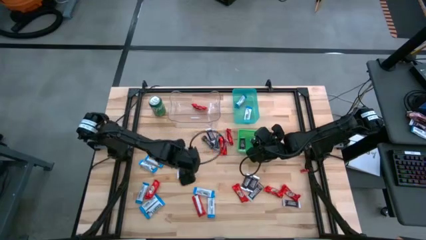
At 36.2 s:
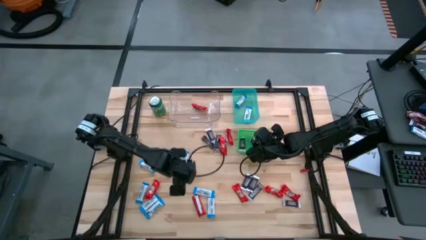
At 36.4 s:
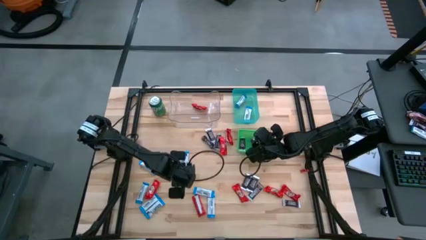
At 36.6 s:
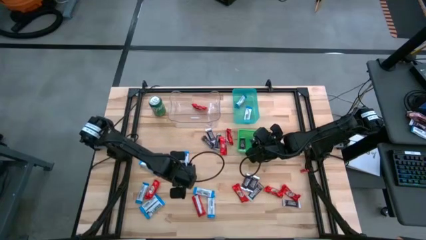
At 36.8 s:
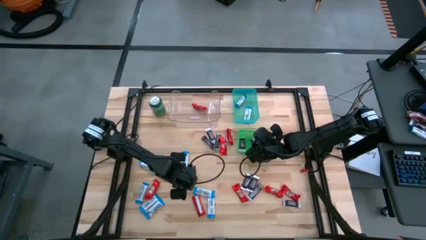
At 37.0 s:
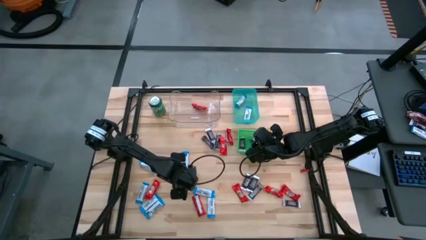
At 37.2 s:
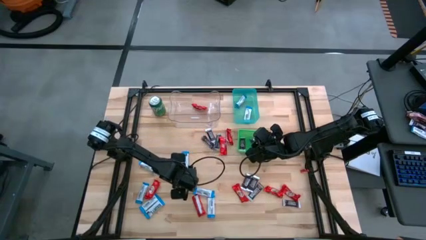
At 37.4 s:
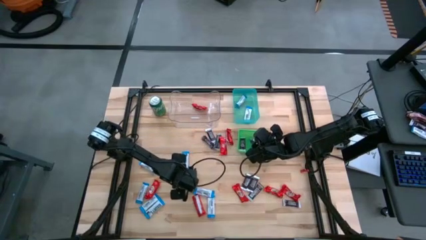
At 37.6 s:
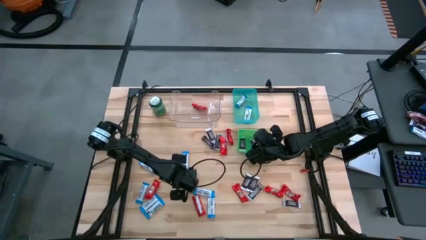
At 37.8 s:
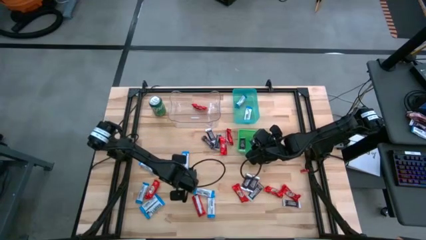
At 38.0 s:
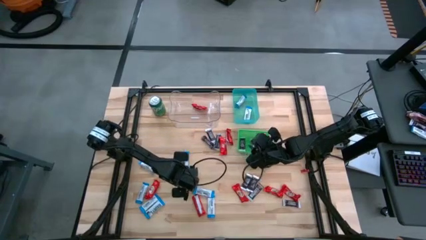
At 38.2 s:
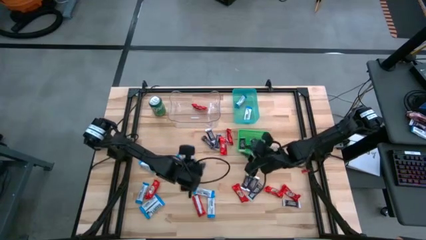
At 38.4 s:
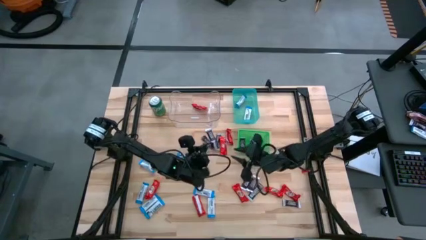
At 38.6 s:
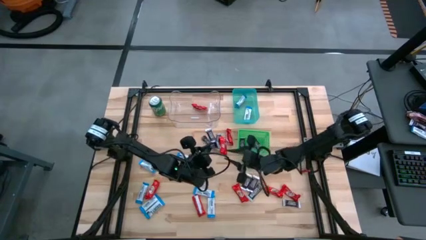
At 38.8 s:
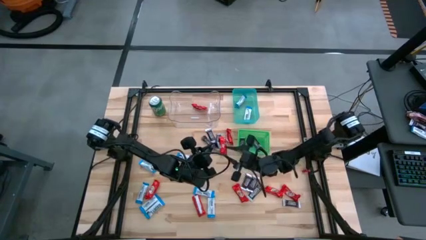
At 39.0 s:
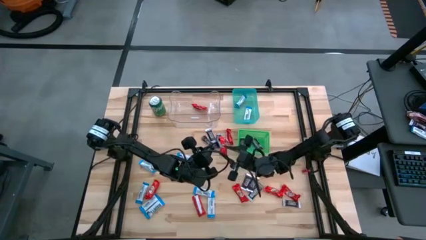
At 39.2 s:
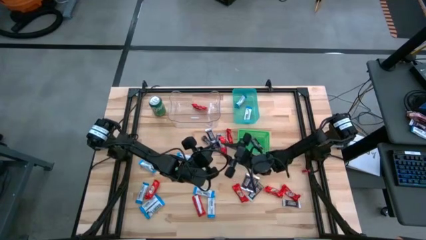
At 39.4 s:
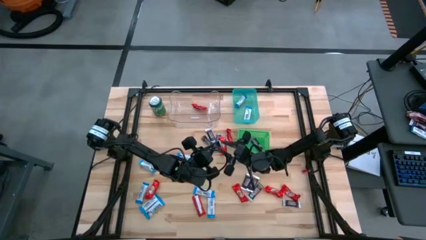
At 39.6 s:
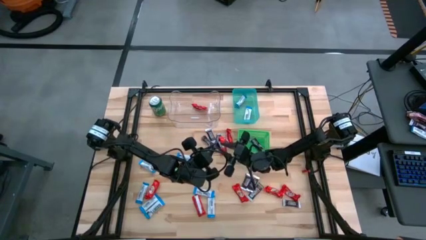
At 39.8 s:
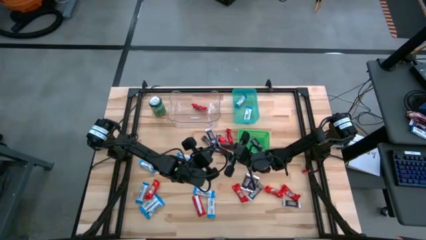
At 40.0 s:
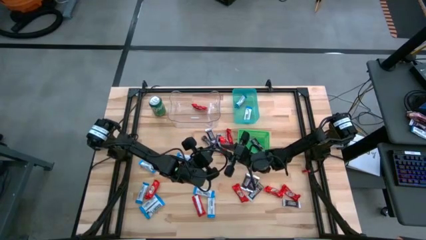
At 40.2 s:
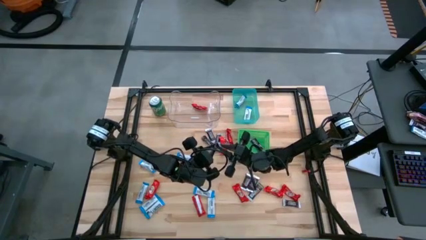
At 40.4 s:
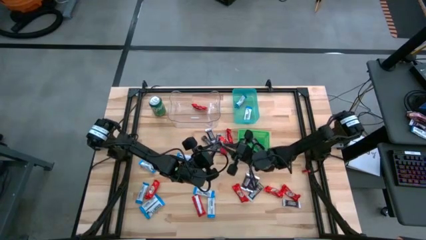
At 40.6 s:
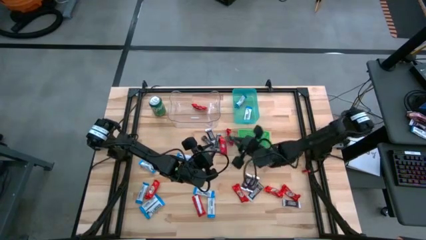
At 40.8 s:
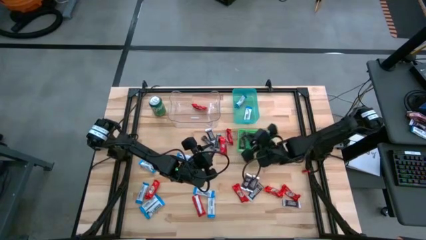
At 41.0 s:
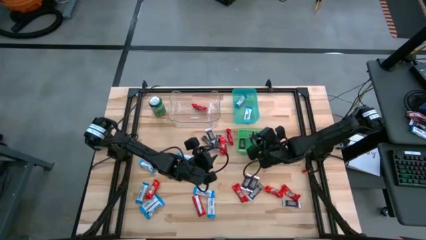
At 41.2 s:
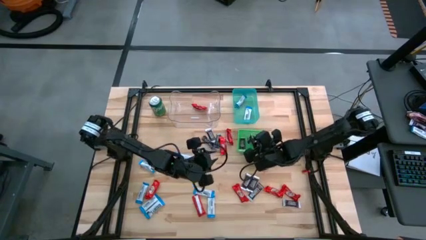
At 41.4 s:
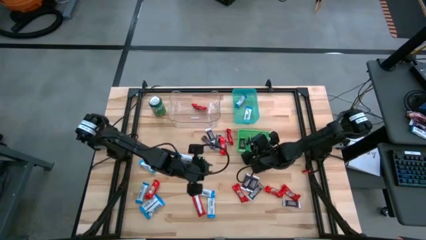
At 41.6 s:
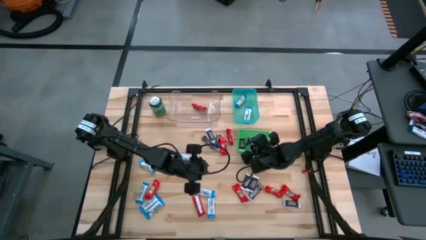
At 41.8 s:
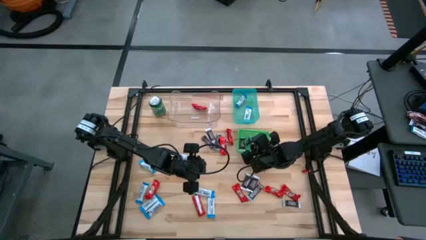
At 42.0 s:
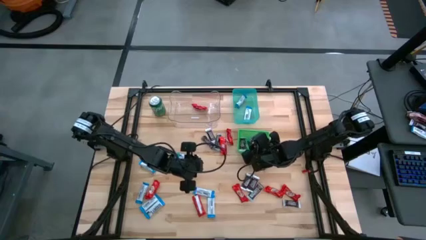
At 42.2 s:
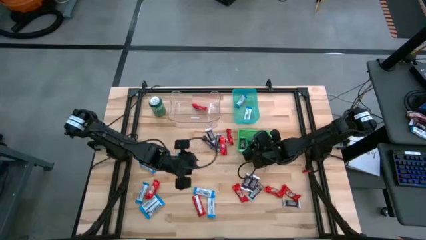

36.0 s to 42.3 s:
Task: Sort candy
Put the brown chocolate bar into the green bin

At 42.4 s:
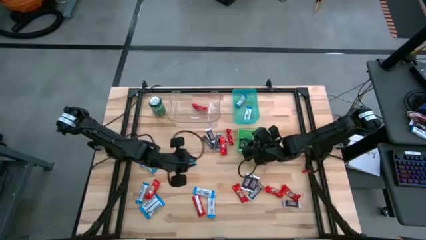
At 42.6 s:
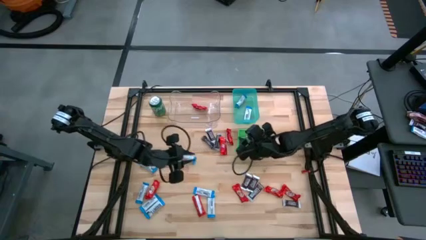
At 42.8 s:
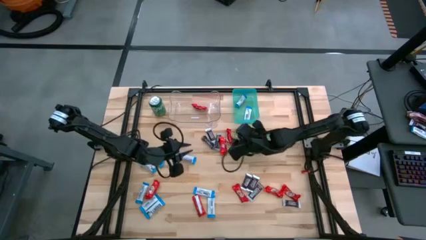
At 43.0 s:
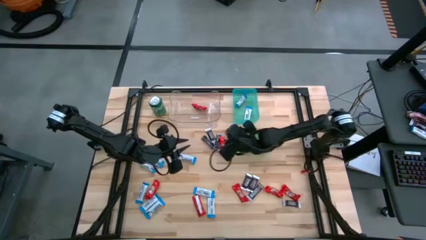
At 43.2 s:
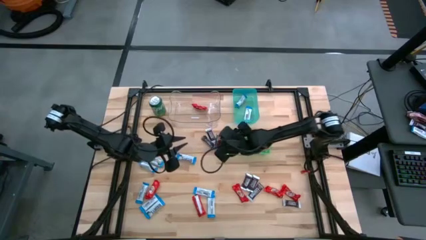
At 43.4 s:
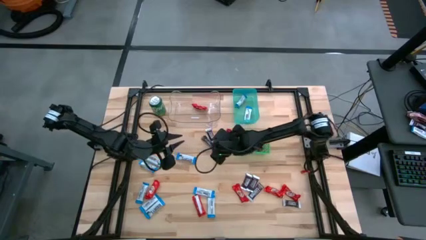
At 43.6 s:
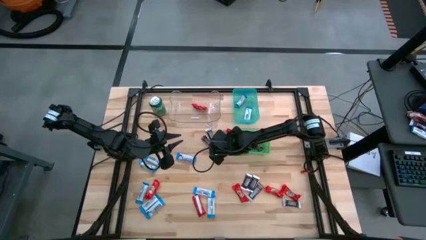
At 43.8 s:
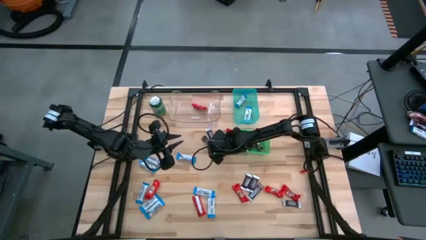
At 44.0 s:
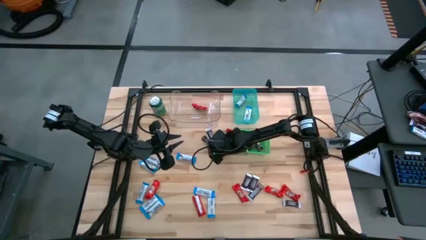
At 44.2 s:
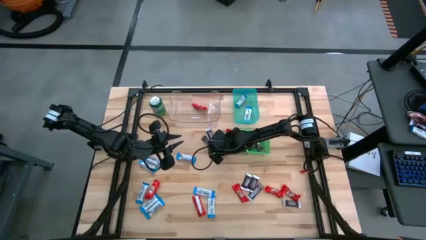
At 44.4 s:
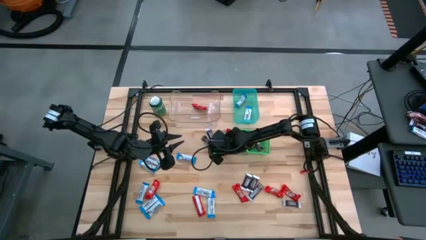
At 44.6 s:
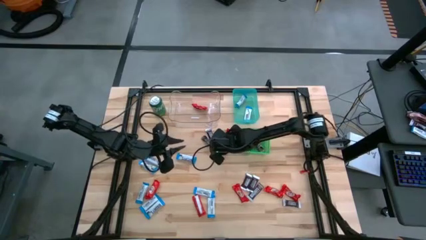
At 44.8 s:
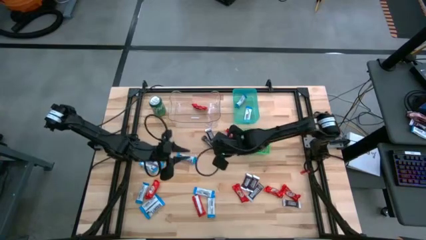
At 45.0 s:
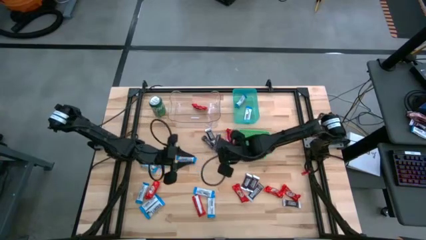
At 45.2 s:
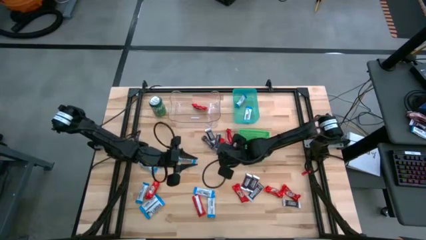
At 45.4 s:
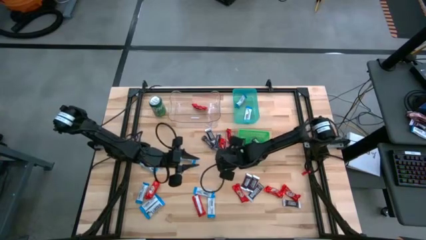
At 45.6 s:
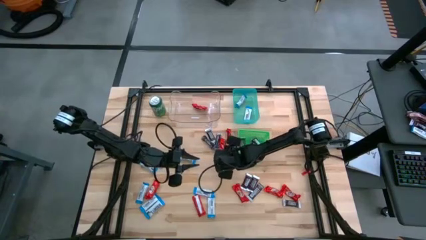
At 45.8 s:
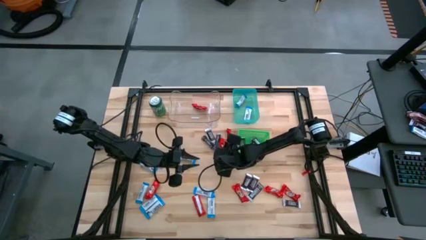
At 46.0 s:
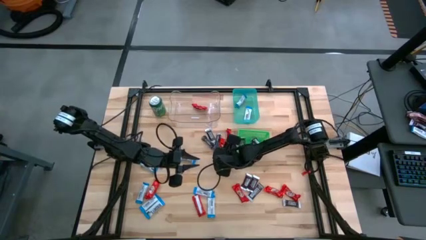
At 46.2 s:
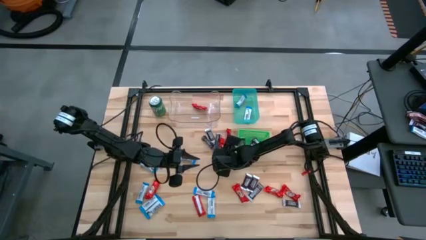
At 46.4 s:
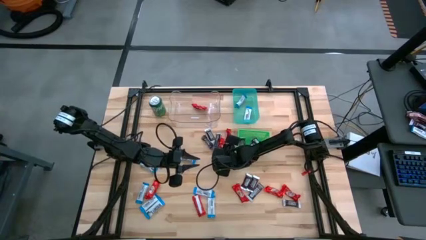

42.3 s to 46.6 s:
Put the red chocolate bar into the transparent bin

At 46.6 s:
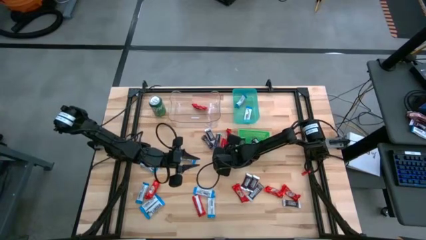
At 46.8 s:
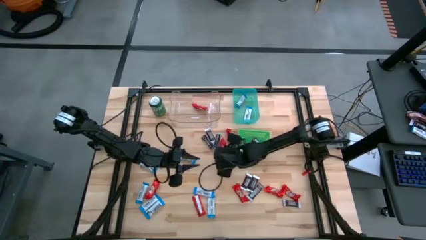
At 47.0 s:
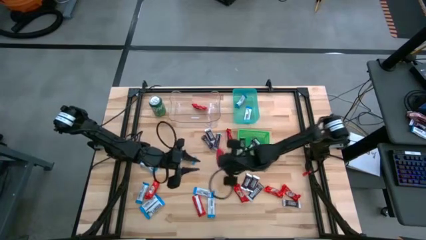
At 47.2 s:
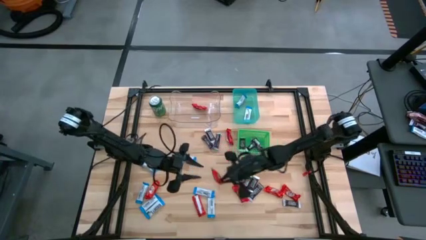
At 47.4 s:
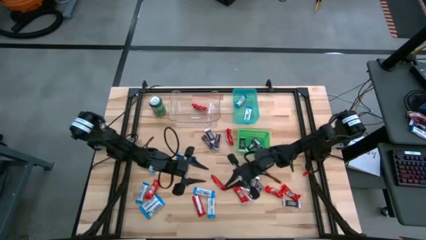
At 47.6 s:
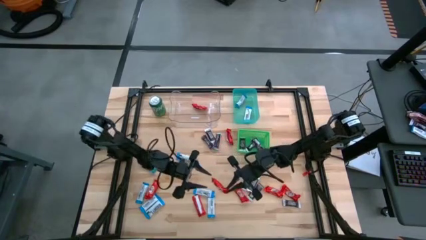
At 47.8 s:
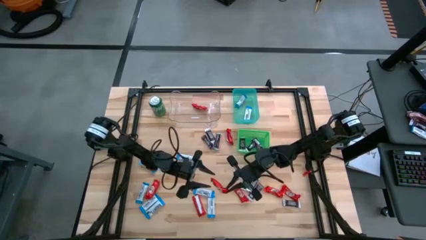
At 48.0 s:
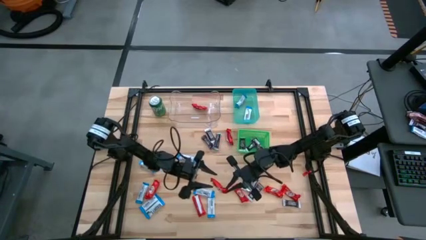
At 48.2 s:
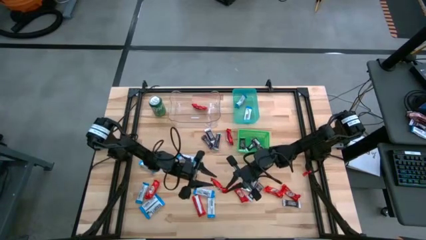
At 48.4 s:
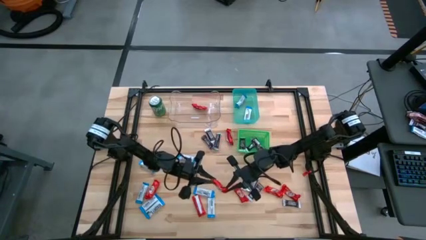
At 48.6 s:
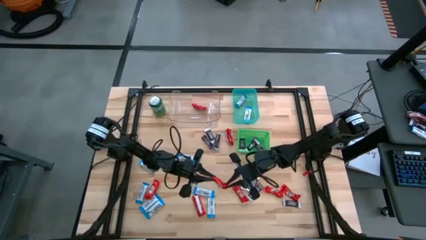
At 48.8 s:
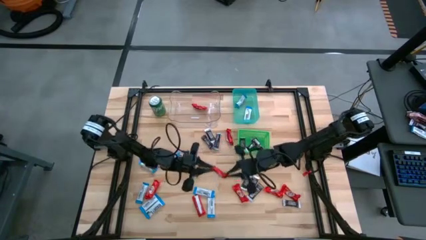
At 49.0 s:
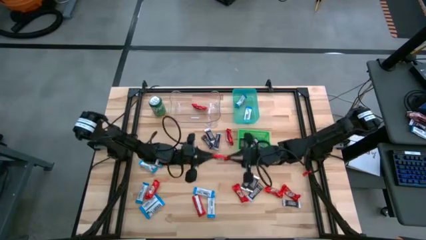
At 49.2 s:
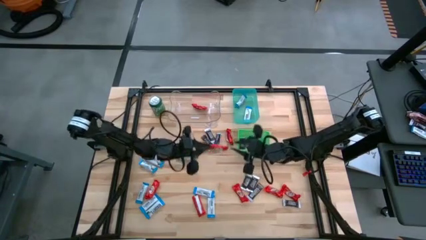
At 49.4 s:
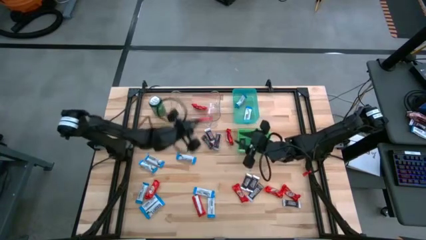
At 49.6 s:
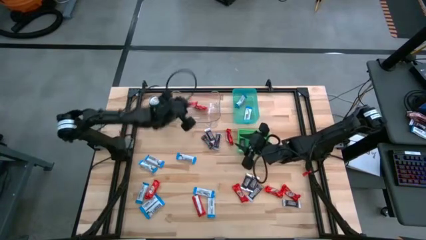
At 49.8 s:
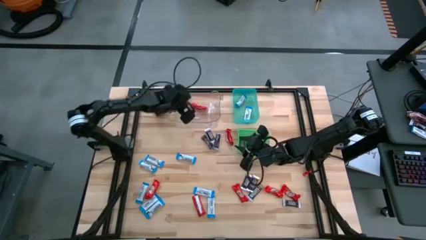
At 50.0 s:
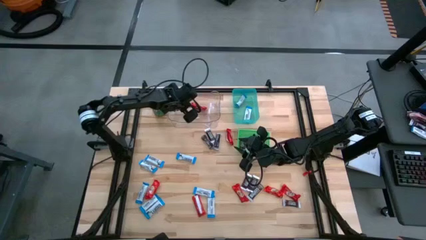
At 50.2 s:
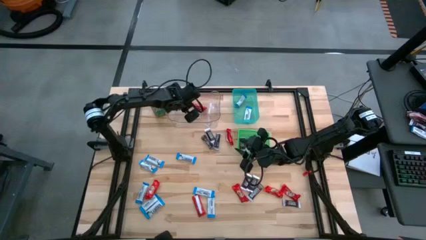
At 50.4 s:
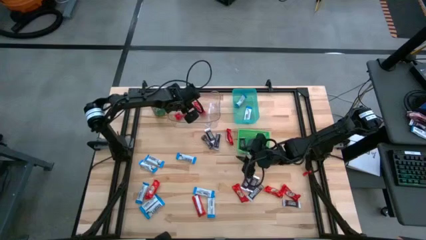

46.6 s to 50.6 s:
Put the red chocolate bar into the transparent bin

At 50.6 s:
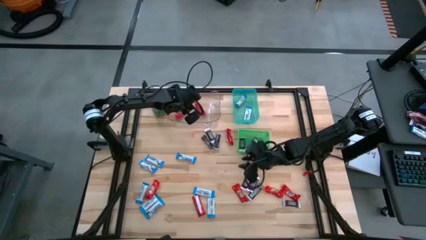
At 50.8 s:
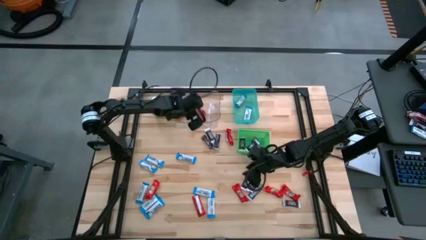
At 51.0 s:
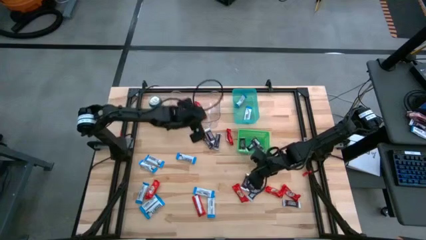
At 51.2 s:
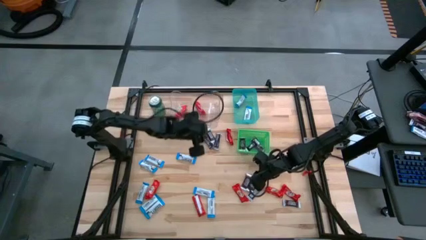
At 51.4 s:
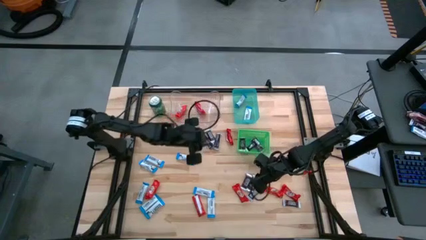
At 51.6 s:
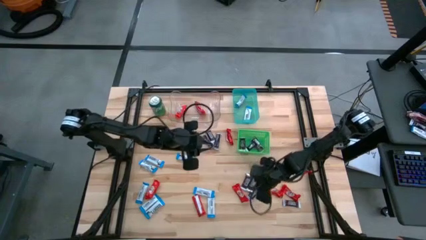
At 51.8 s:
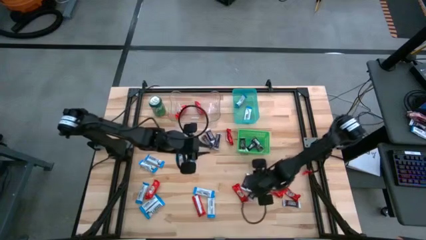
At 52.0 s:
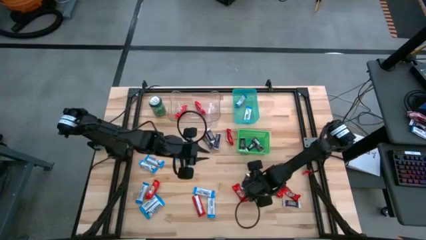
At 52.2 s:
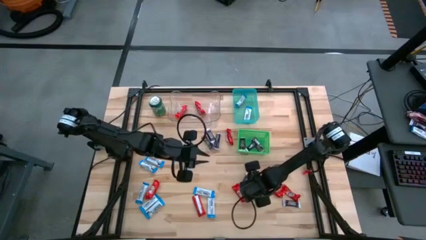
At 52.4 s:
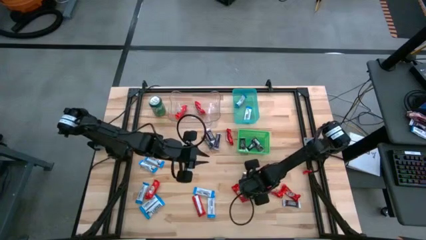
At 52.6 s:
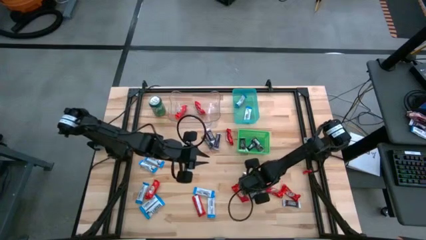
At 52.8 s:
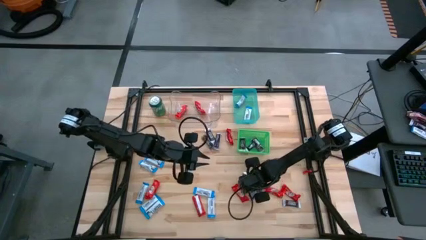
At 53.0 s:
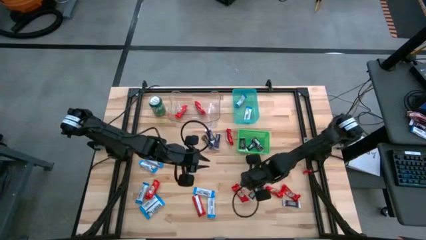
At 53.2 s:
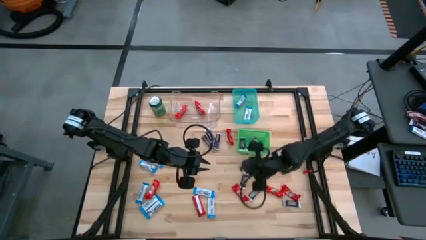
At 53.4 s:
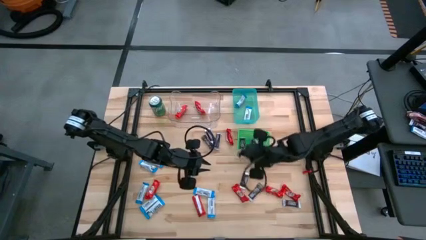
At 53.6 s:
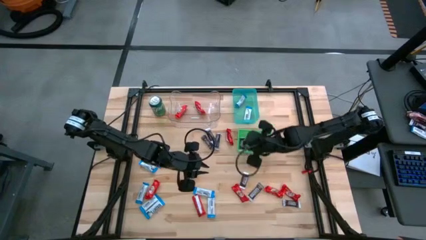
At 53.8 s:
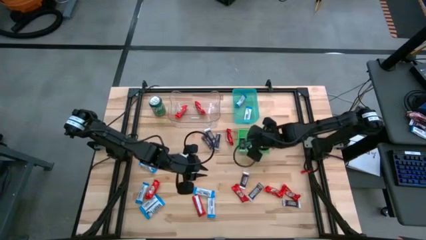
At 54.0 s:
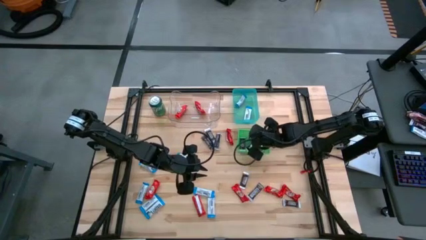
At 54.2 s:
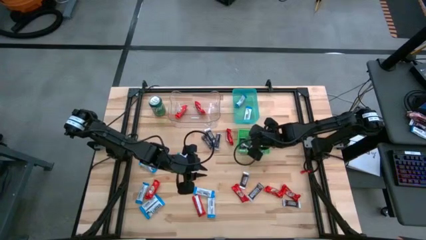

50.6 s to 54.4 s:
Put the brown chocolate bar into the green bin
